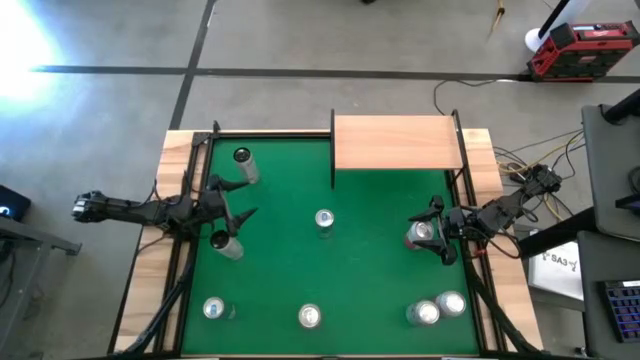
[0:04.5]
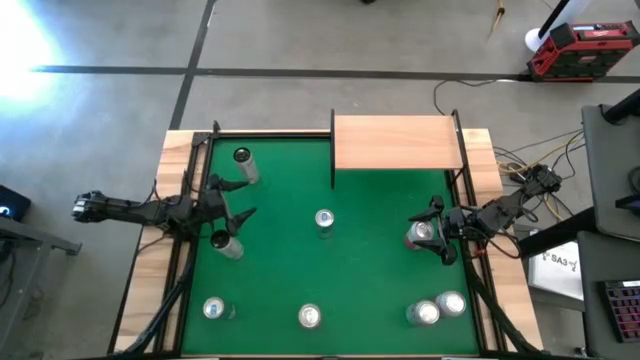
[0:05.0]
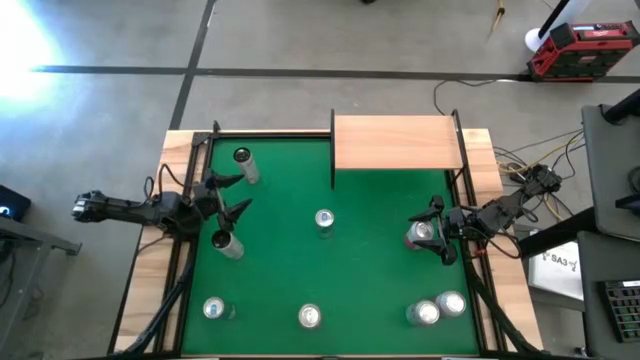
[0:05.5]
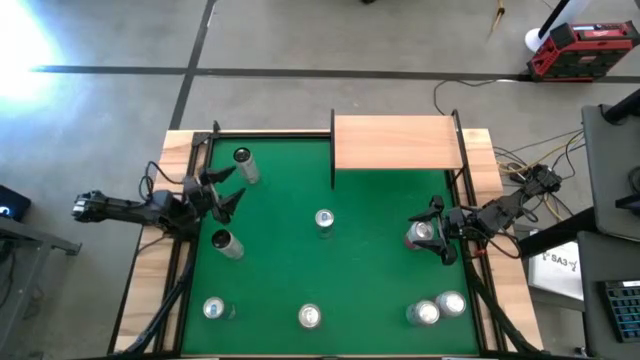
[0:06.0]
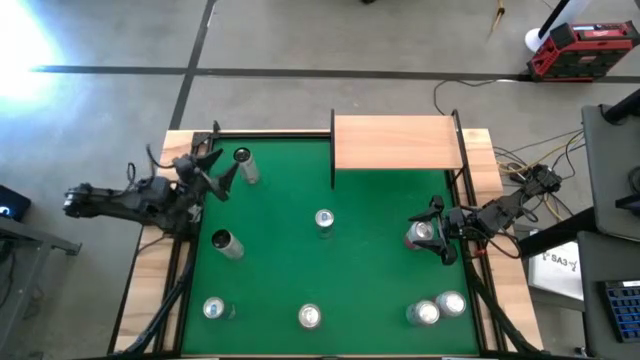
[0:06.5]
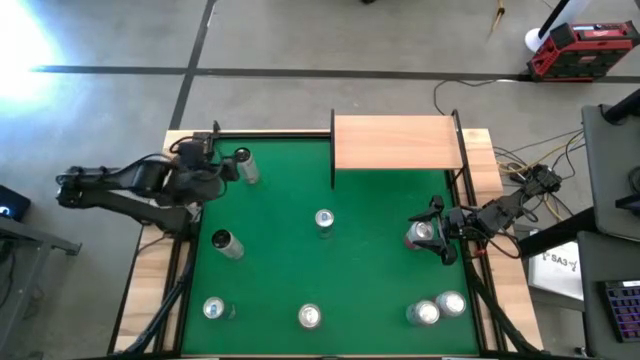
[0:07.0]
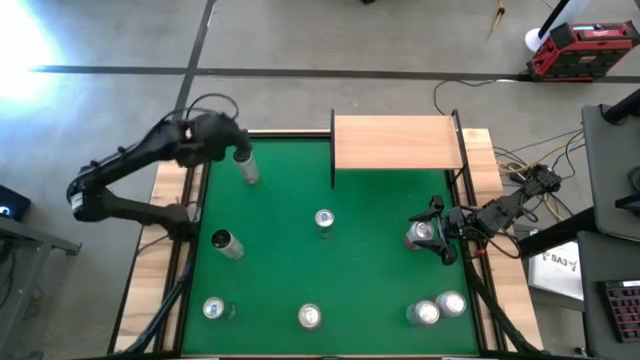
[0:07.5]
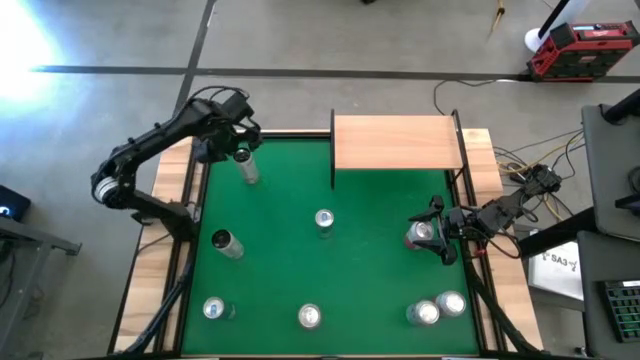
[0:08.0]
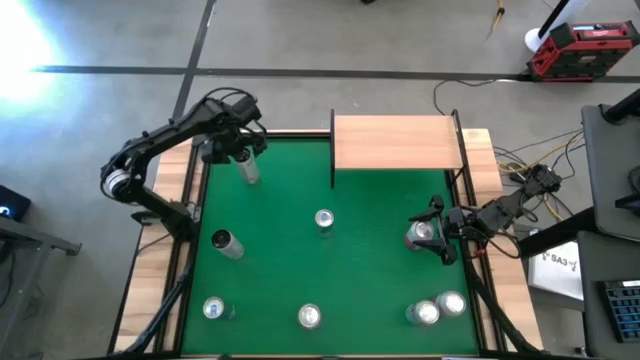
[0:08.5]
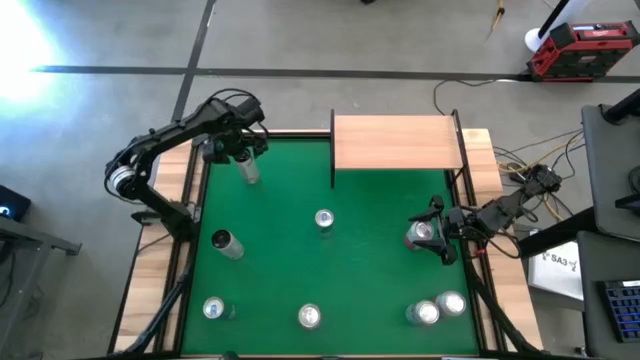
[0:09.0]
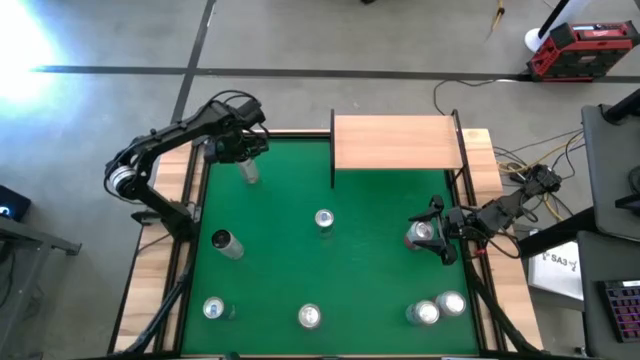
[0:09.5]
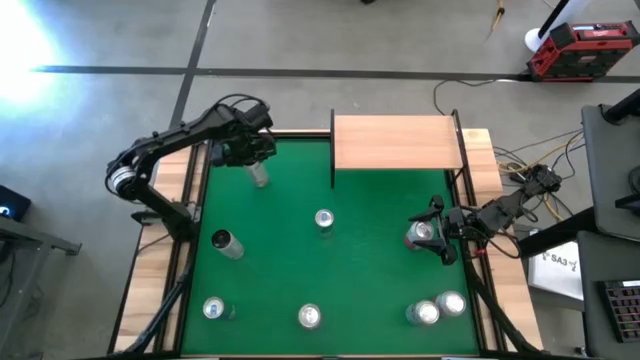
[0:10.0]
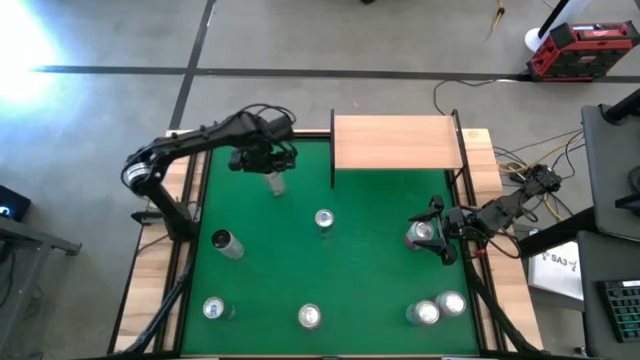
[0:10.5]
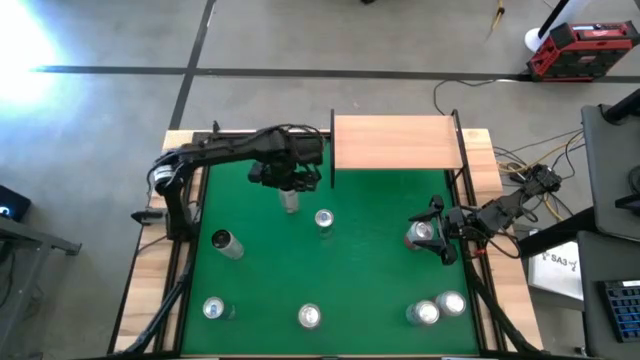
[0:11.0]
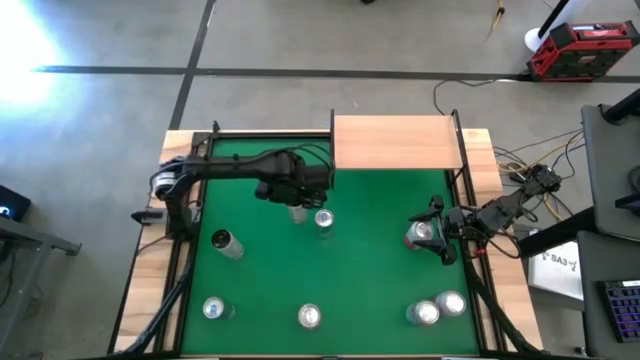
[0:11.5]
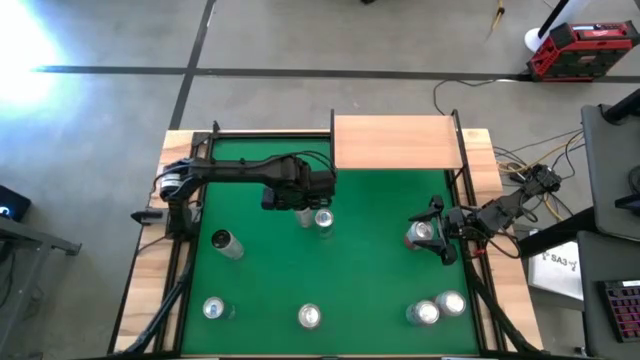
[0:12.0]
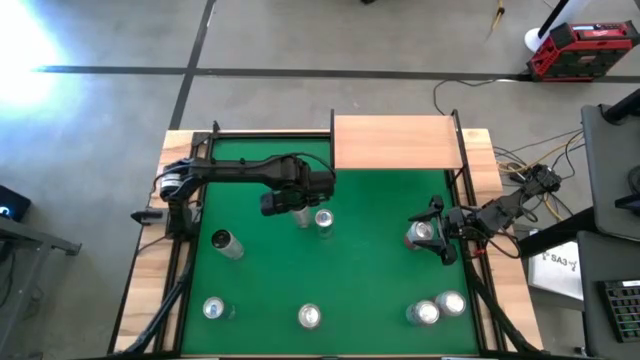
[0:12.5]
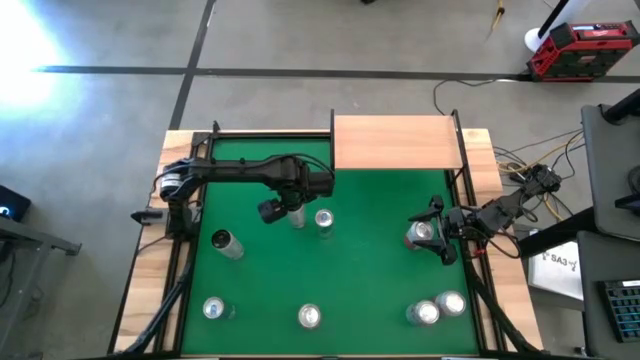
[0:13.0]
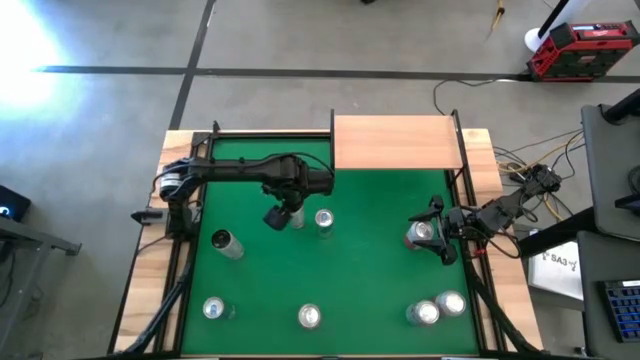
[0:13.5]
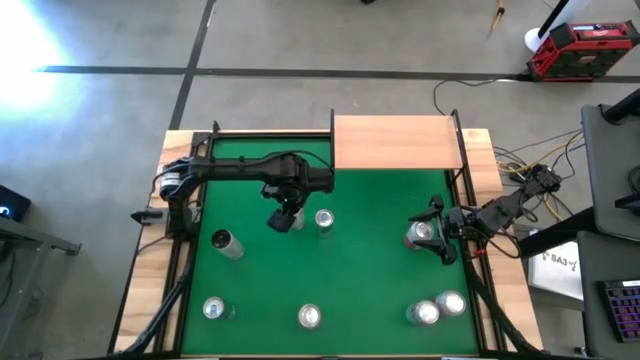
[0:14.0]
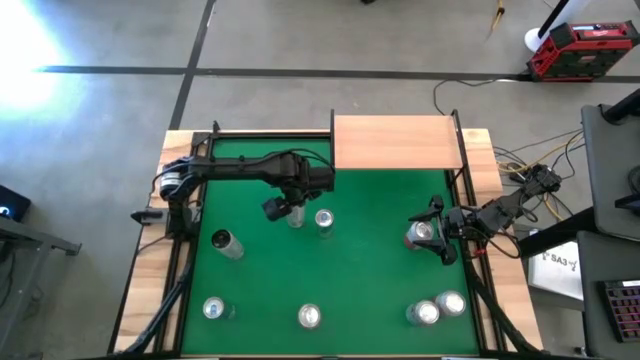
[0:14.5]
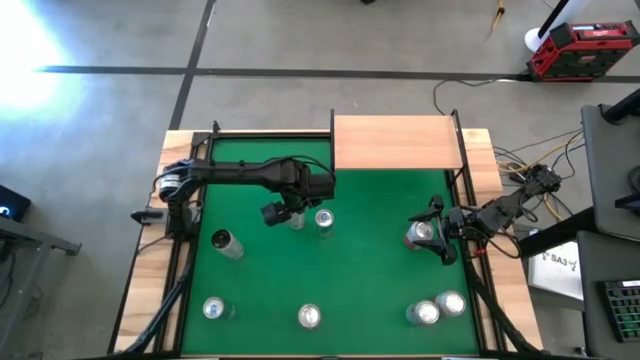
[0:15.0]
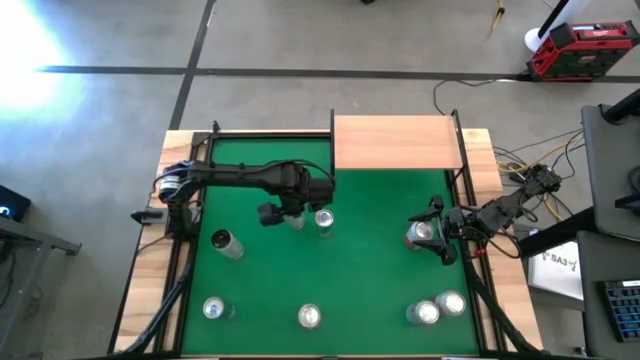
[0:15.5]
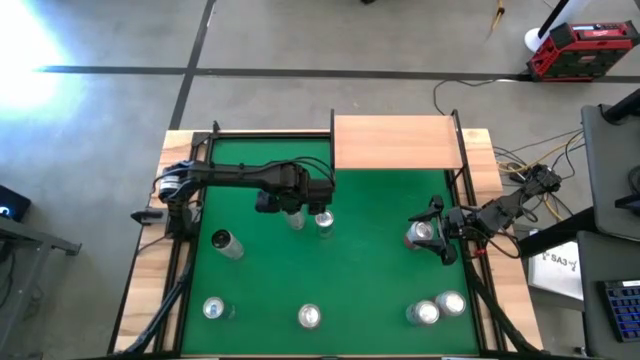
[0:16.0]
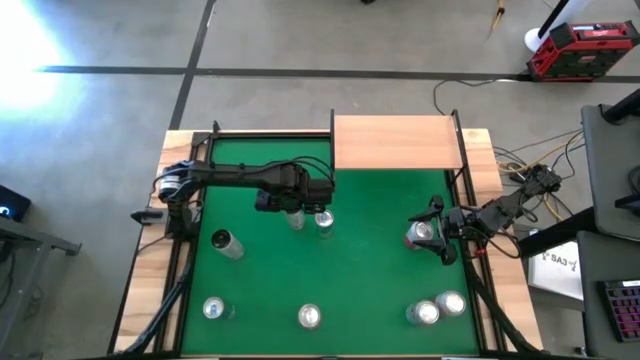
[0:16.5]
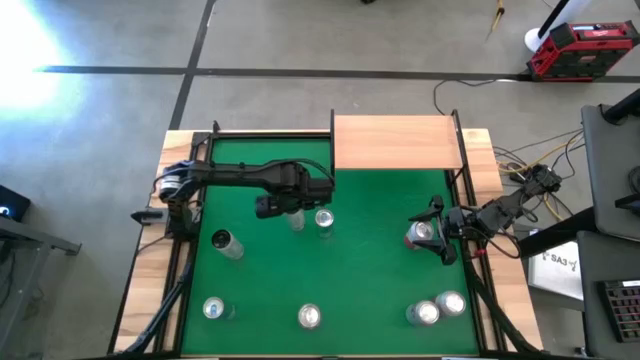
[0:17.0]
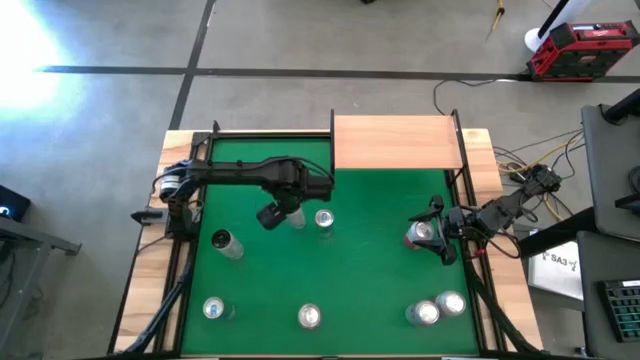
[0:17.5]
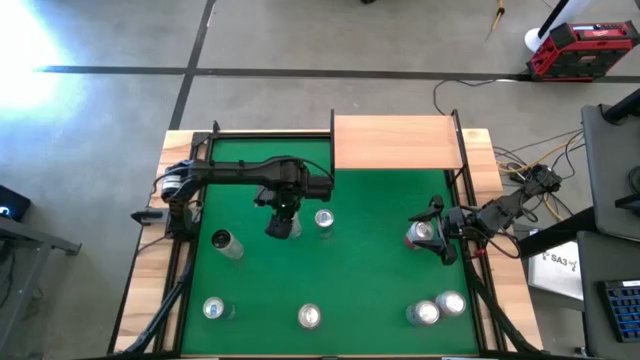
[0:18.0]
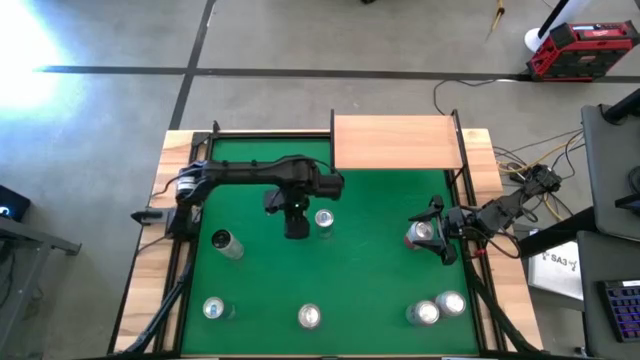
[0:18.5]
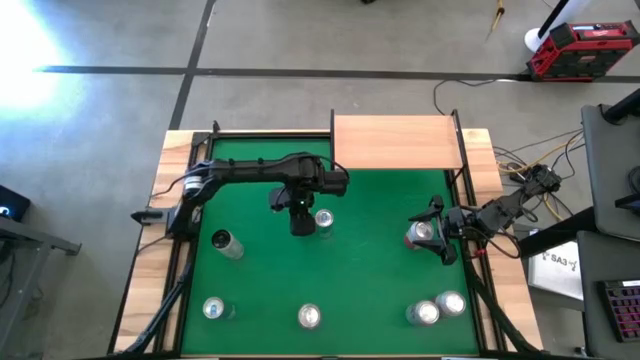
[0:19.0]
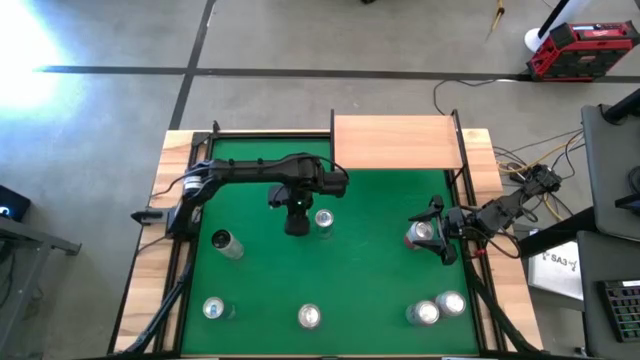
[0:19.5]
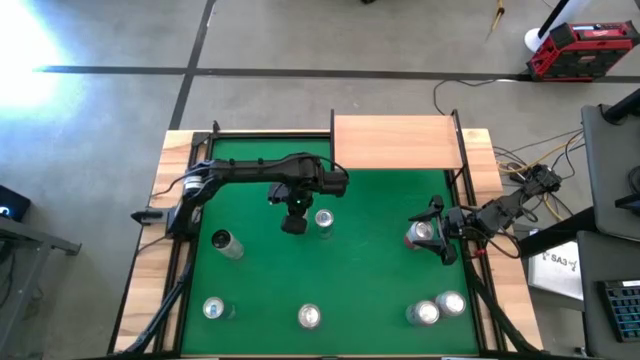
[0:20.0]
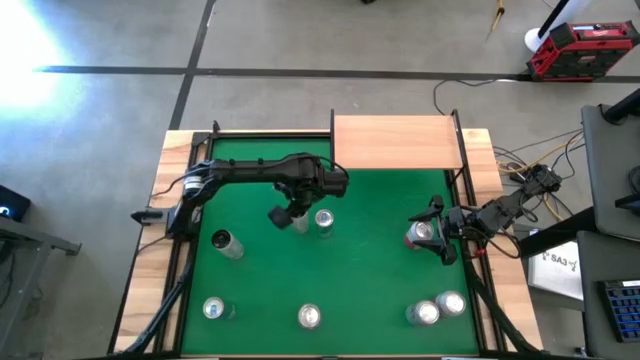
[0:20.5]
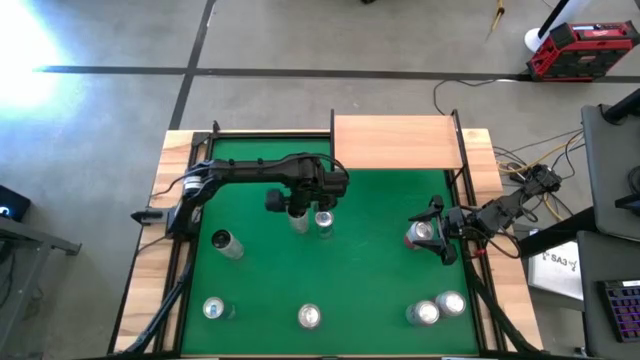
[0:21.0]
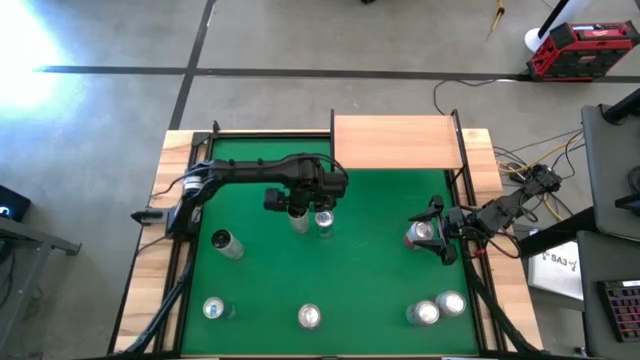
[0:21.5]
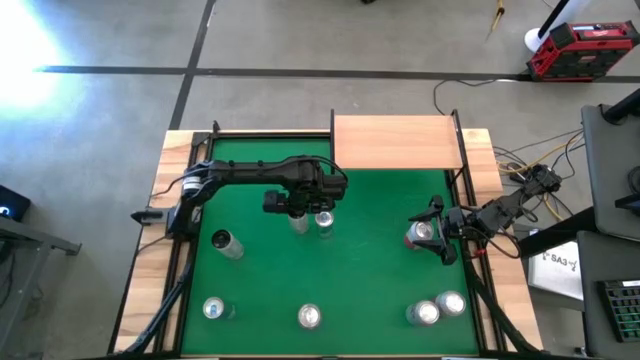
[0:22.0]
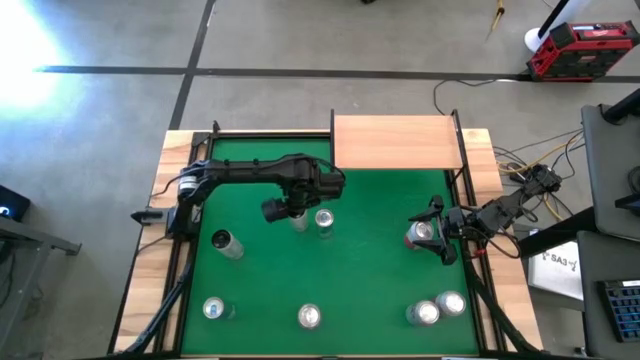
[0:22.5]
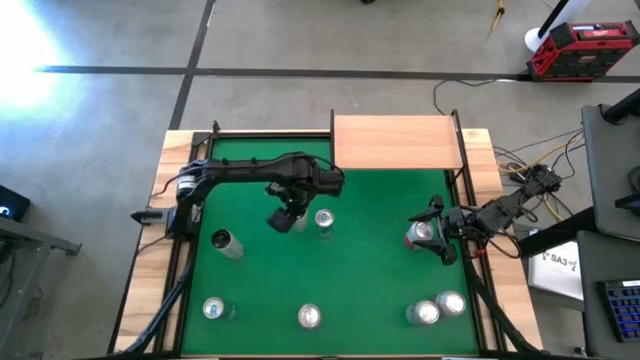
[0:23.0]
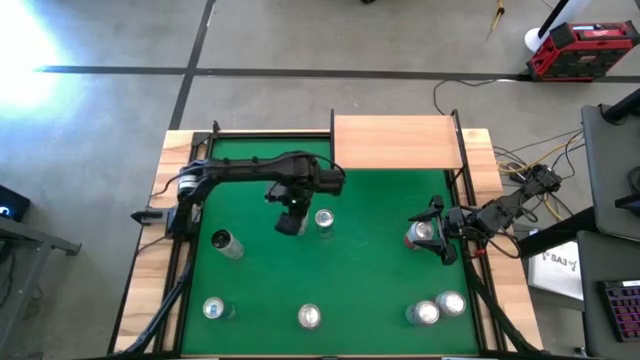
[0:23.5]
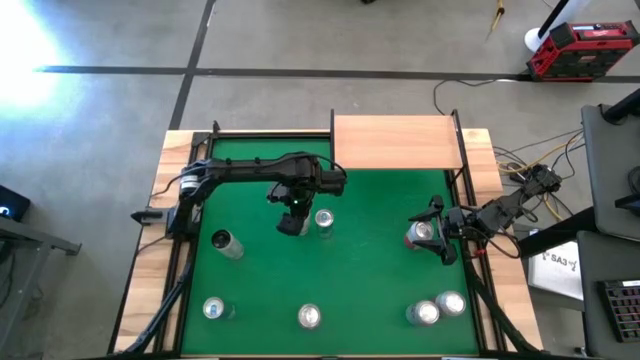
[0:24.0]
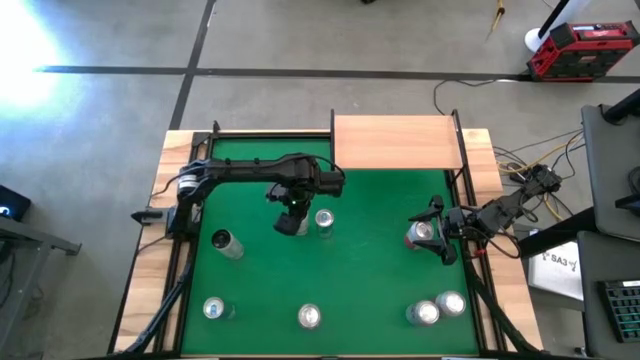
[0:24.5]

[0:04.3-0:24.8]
Task: Place canned beverage on shelf
Move the top white-yellow soda can to the center of the table
